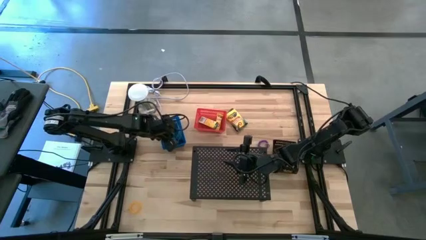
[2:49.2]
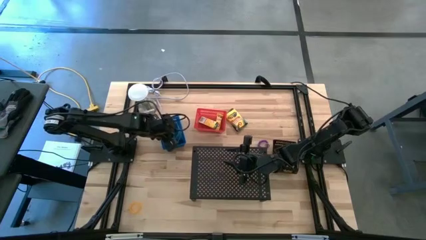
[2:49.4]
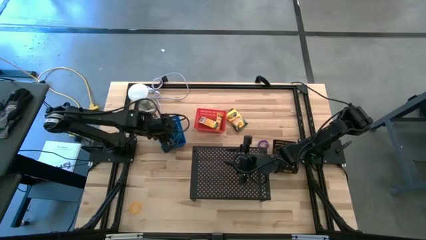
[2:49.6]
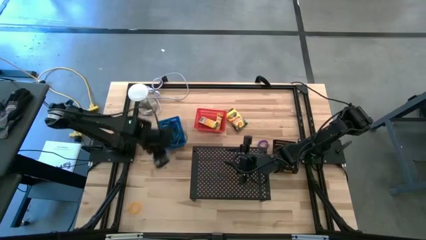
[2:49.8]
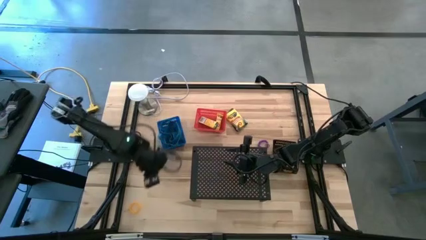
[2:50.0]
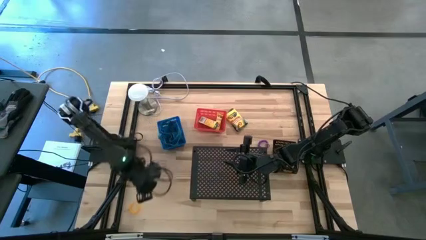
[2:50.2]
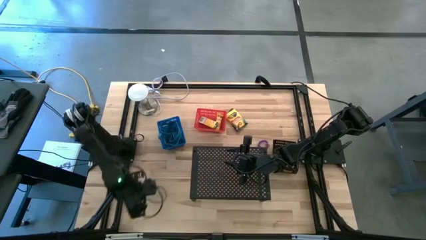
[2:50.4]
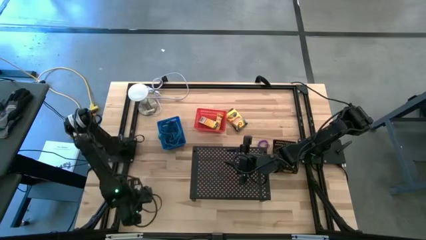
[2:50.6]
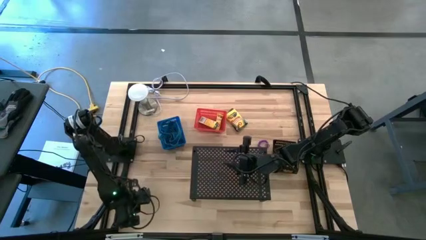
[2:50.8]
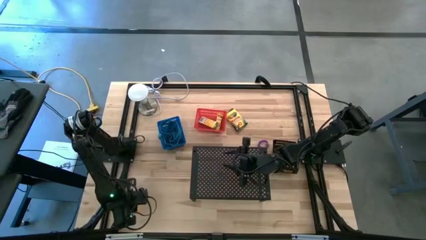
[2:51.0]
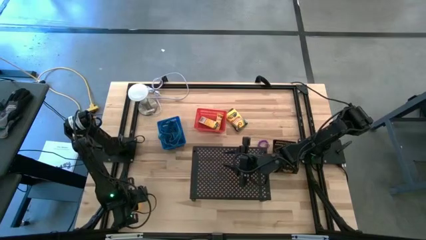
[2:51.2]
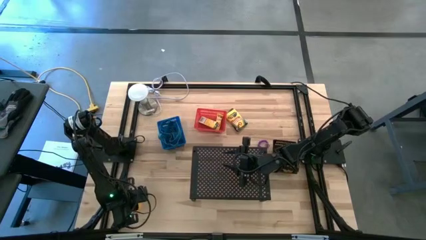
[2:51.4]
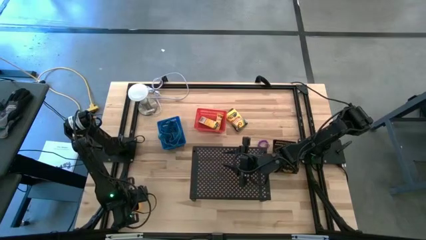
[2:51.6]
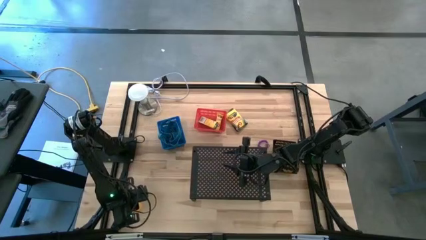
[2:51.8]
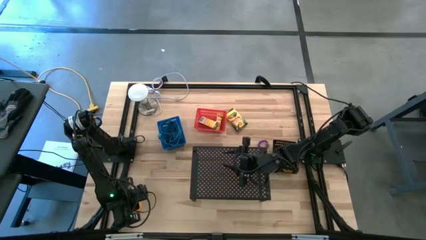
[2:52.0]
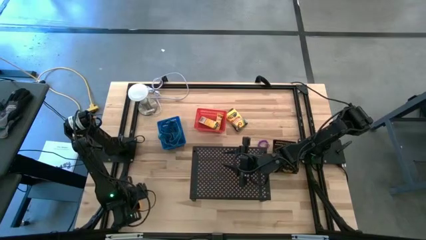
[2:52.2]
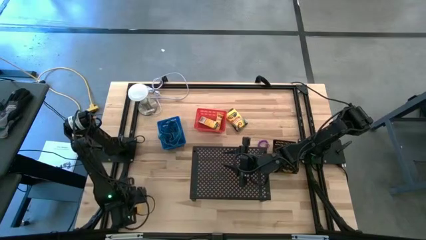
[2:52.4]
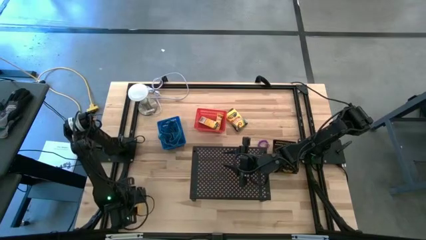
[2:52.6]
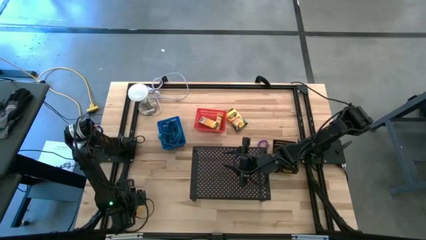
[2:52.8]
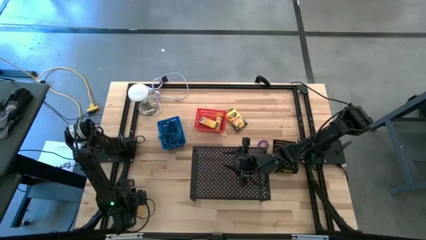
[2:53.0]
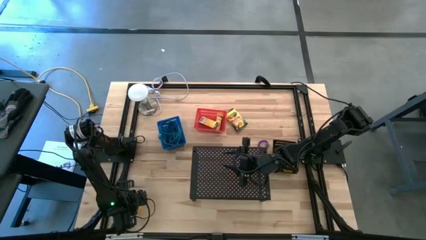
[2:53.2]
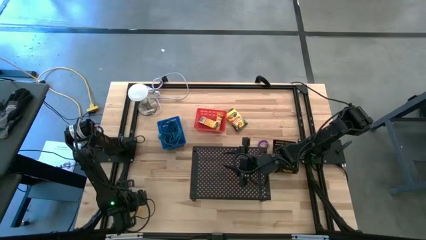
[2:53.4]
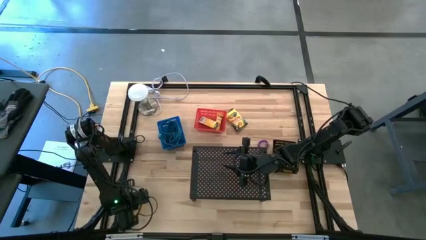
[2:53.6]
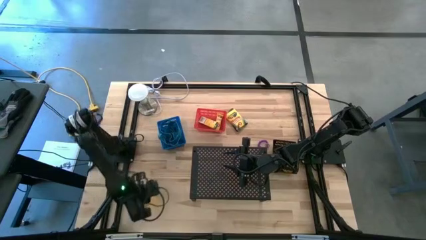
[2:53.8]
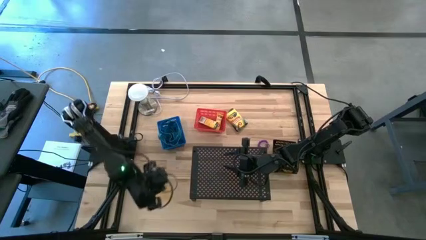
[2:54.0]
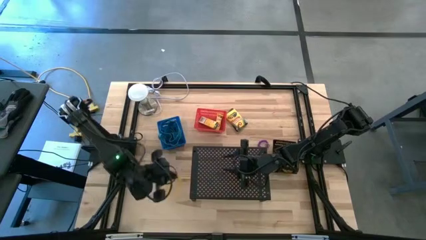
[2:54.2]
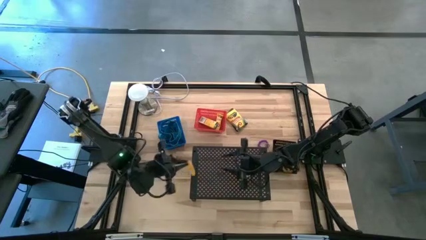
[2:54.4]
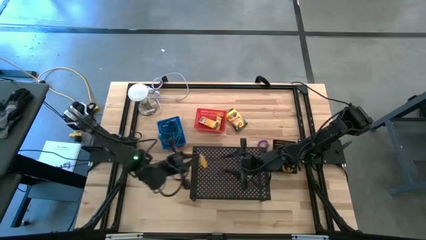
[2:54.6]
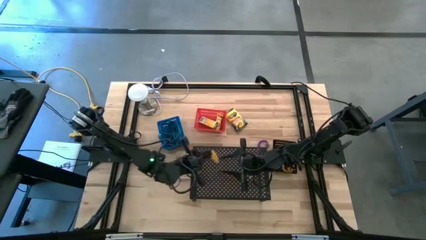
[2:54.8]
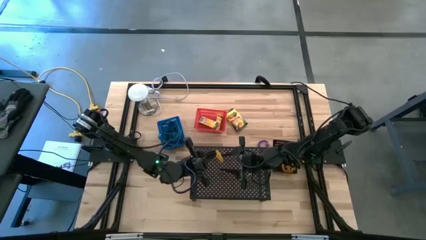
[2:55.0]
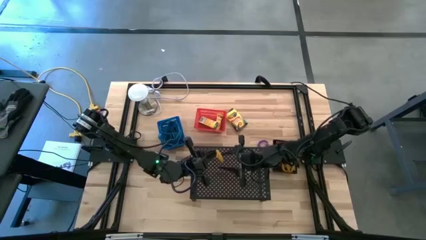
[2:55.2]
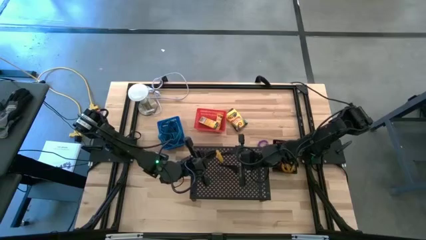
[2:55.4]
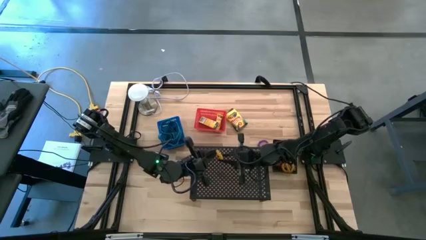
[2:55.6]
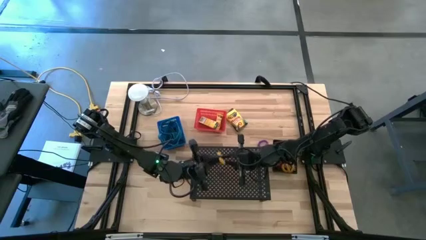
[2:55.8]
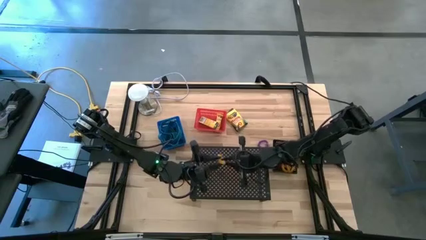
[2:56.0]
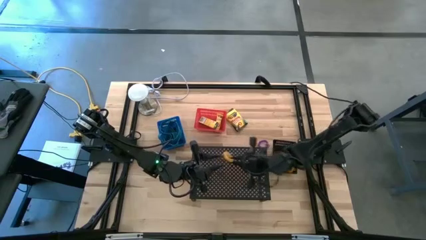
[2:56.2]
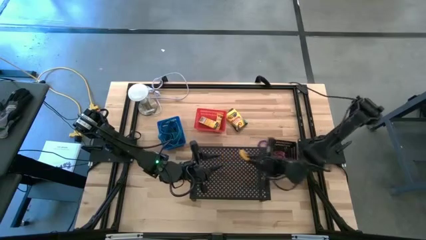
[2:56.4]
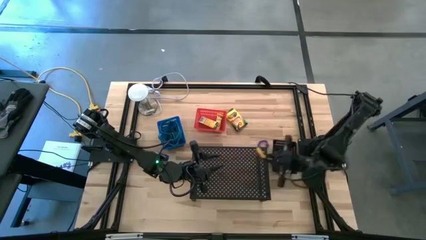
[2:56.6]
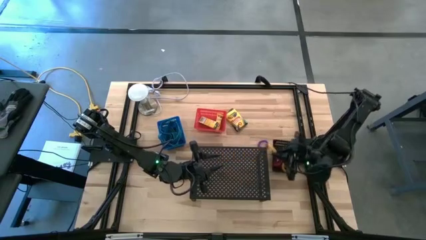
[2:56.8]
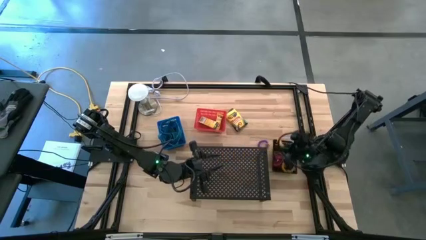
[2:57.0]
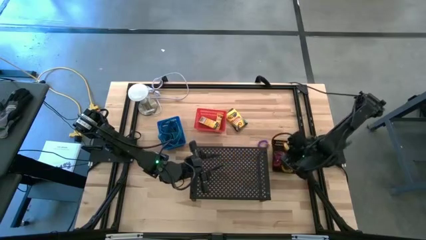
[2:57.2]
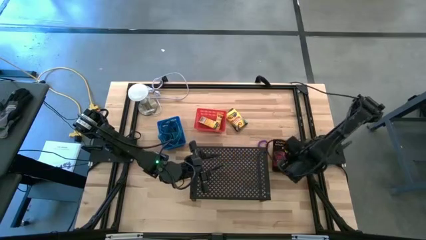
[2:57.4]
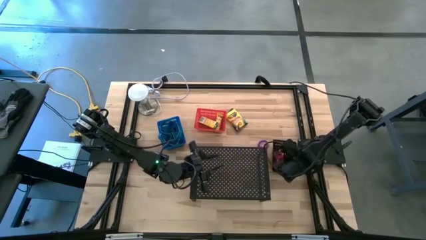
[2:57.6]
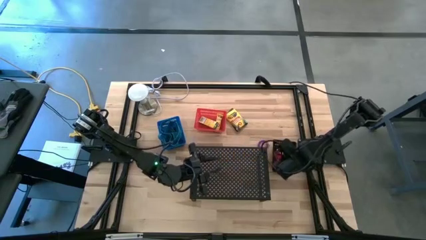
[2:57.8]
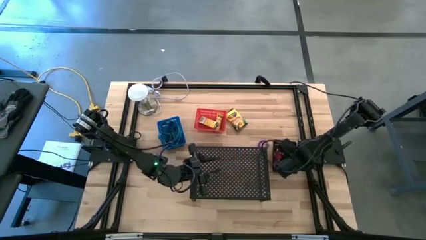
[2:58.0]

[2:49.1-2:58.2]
Task: Pick & Place Office Desk Supplies
Put the yellow spring keychain into the black bin

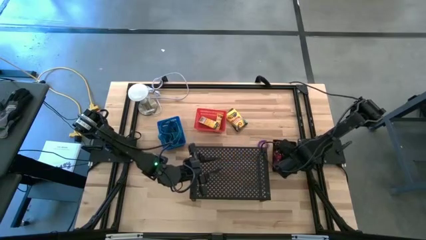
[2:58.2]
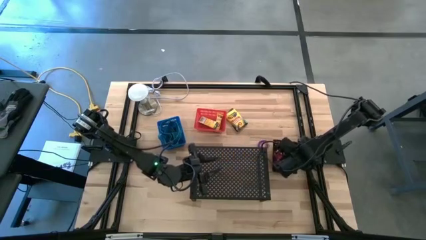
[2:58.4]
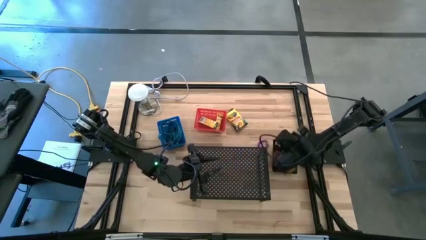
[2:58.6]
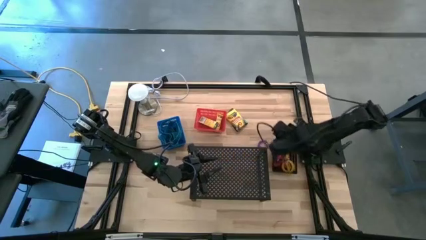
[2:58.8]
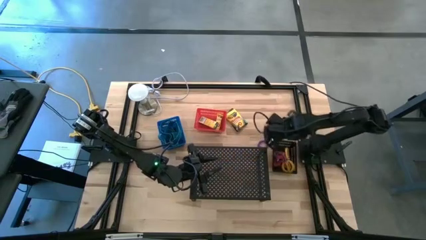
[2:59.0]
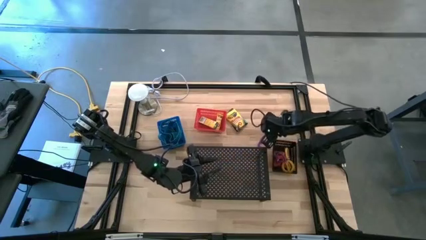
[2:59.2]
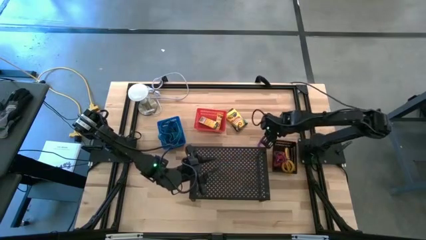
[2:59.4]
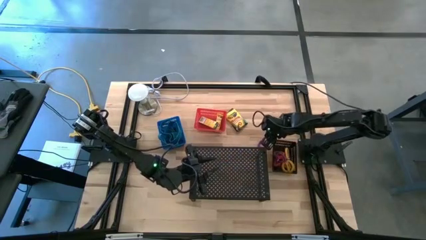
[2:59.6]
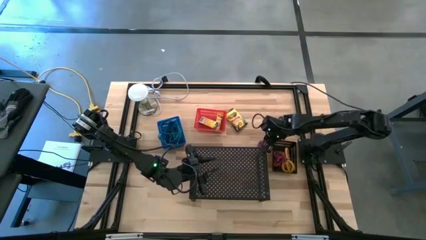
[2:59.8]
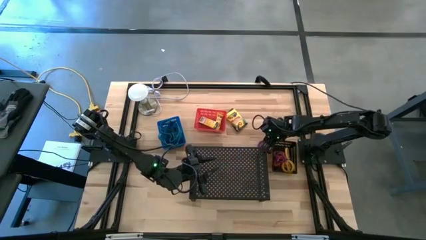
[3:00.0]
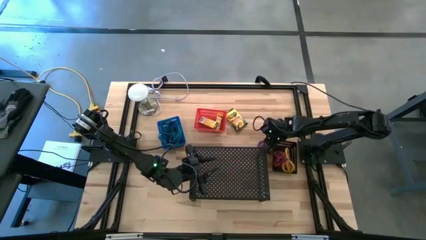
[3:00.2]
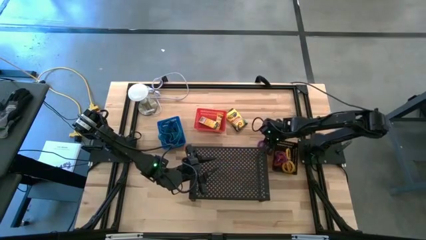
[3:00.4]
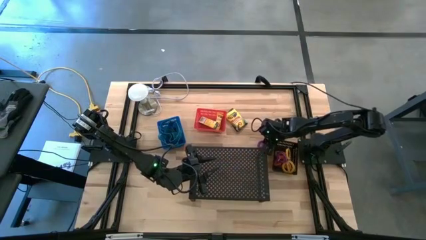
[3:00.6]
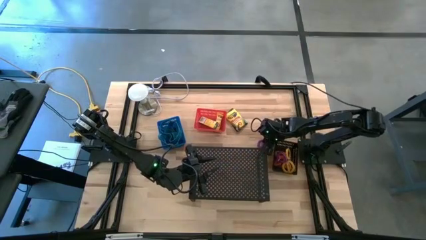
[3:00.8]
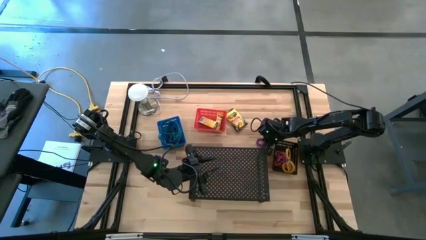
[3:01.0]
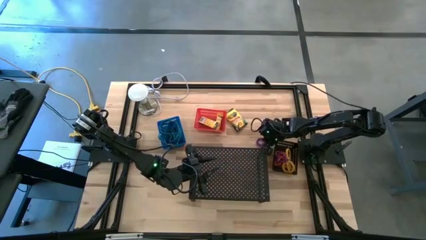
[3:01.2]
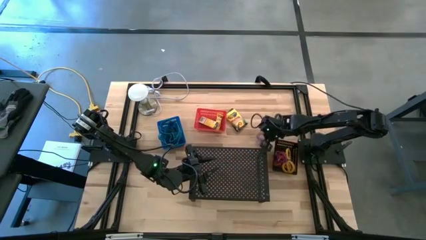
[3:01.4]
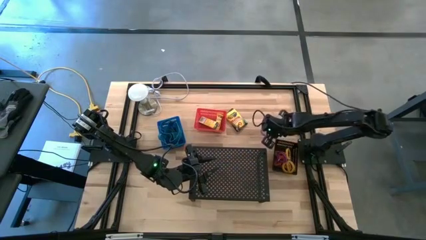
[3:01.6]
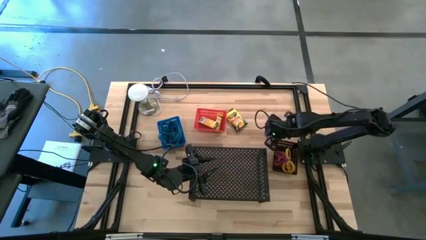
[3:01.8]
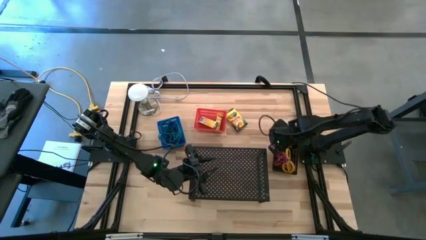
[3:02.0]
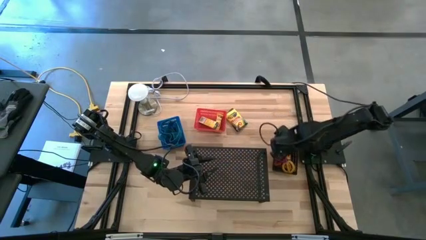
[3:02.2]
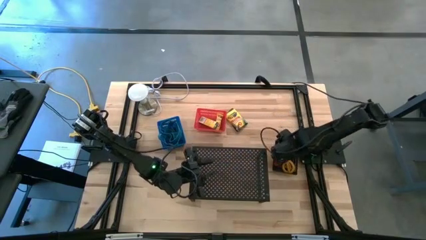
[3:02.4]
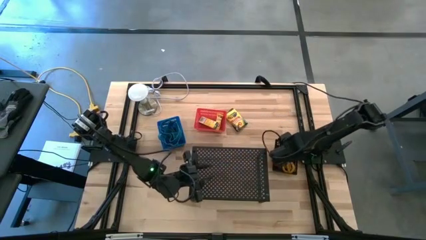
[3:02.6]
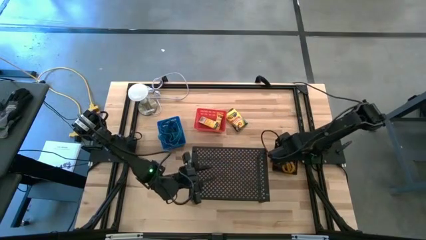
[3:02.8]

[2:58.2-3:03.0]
Put the purple spring keychain into the black bin
